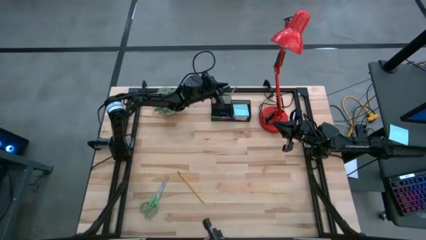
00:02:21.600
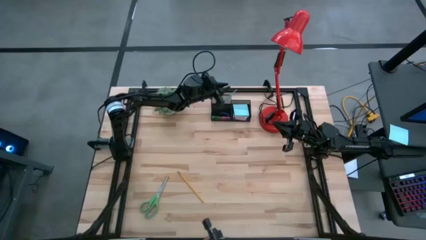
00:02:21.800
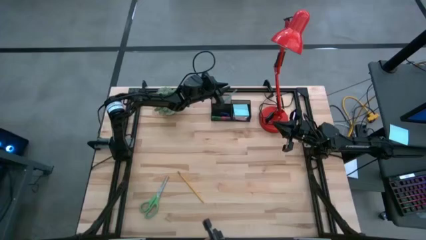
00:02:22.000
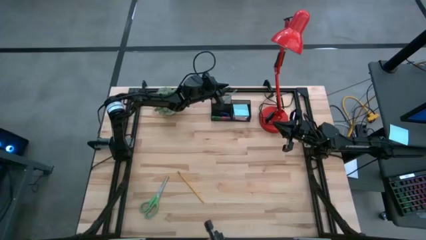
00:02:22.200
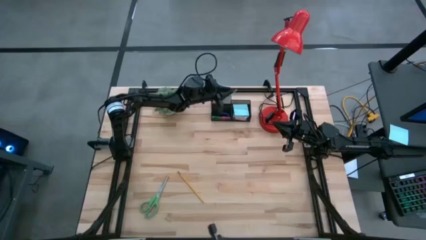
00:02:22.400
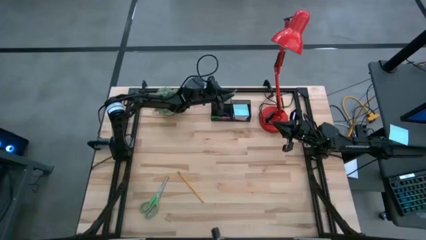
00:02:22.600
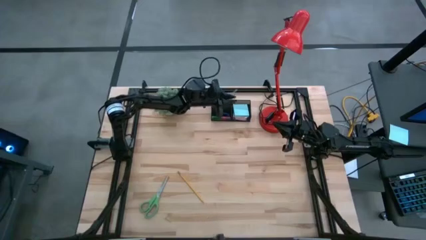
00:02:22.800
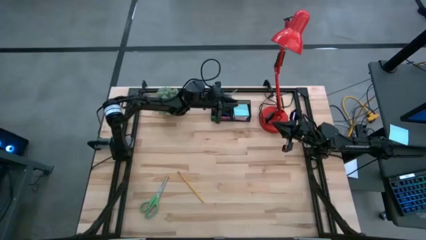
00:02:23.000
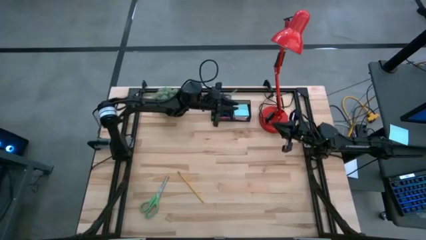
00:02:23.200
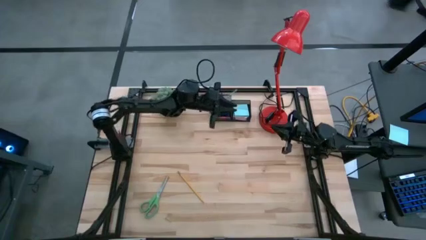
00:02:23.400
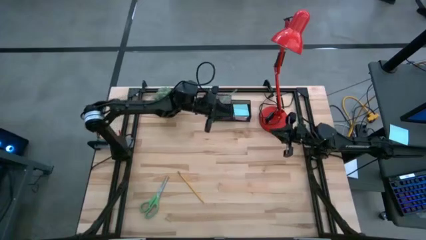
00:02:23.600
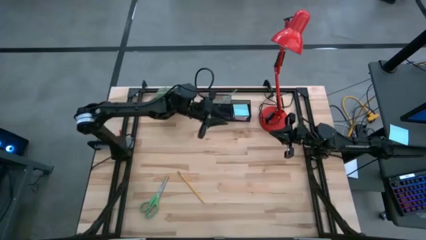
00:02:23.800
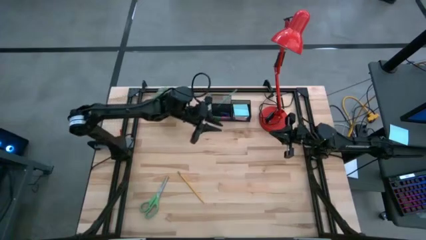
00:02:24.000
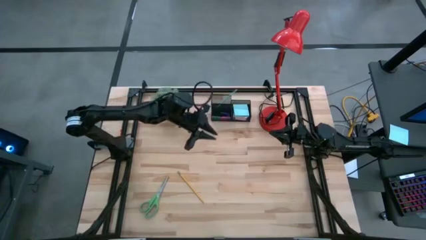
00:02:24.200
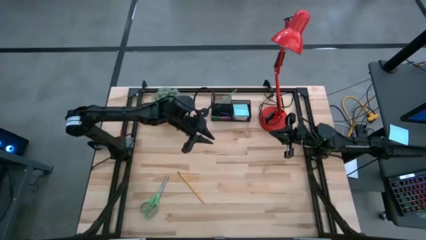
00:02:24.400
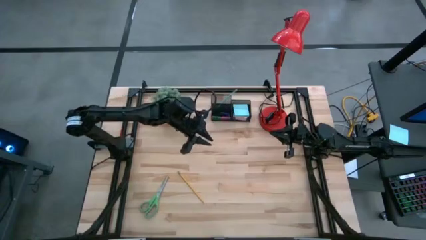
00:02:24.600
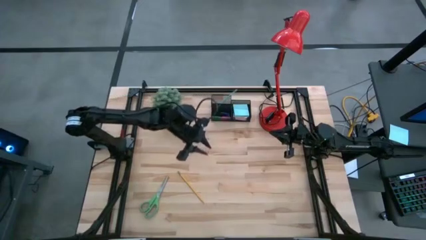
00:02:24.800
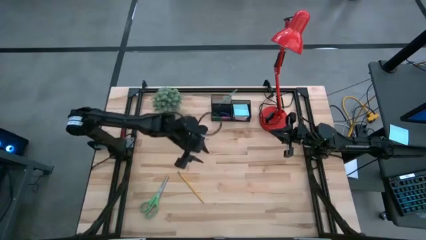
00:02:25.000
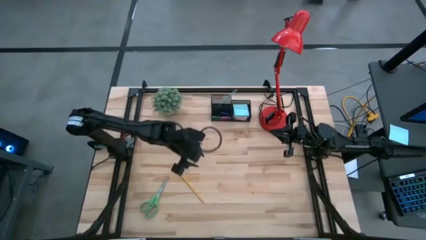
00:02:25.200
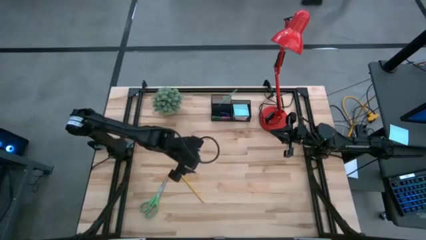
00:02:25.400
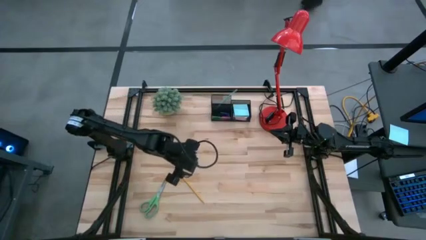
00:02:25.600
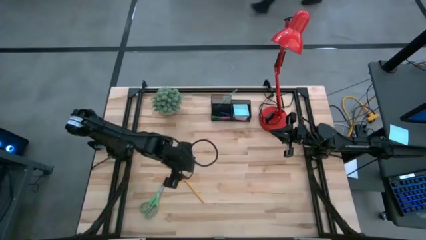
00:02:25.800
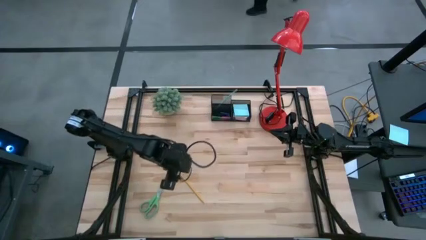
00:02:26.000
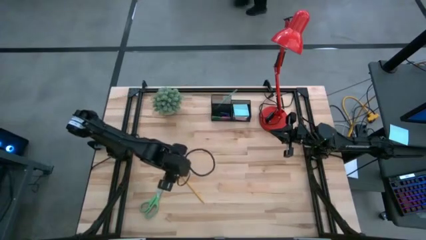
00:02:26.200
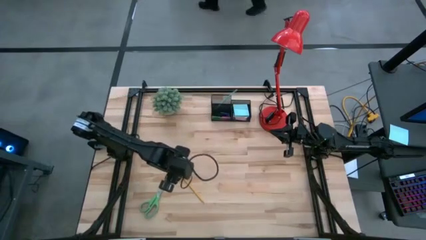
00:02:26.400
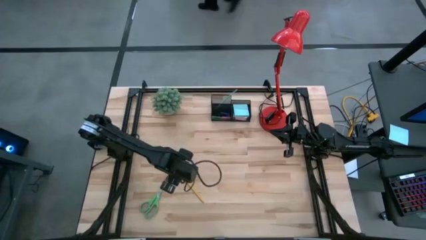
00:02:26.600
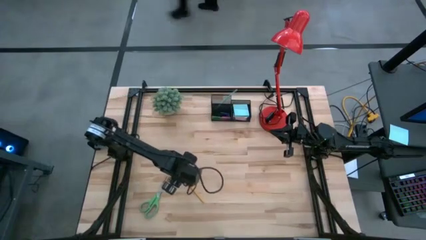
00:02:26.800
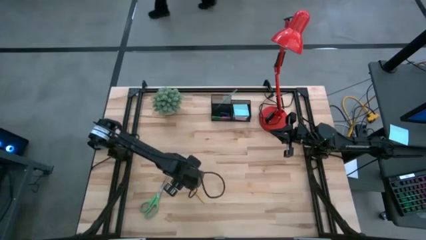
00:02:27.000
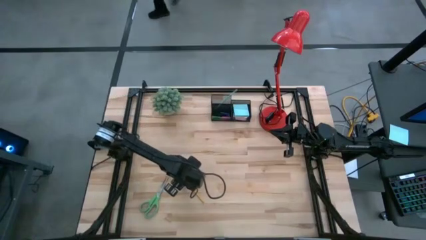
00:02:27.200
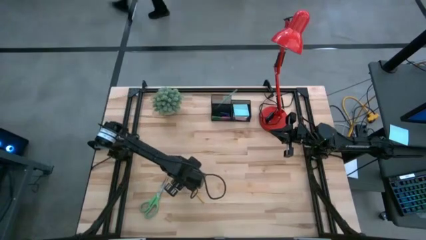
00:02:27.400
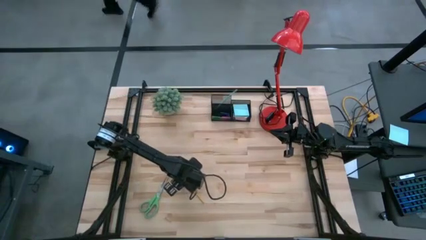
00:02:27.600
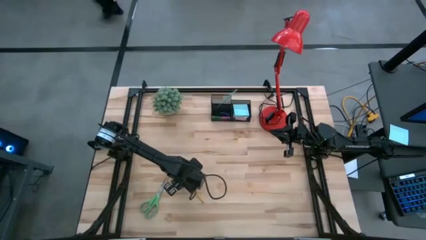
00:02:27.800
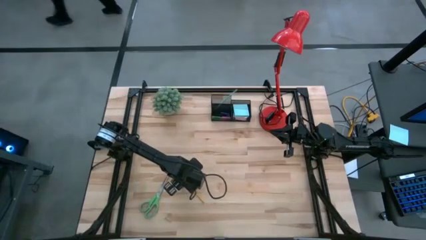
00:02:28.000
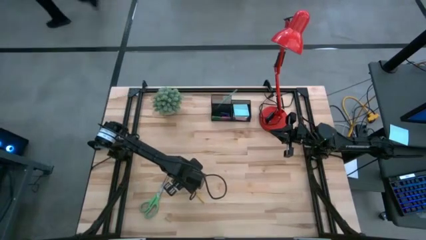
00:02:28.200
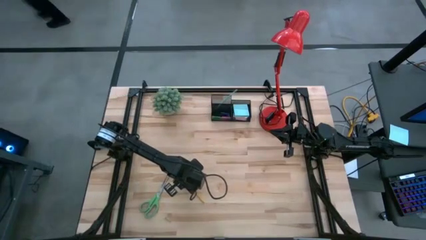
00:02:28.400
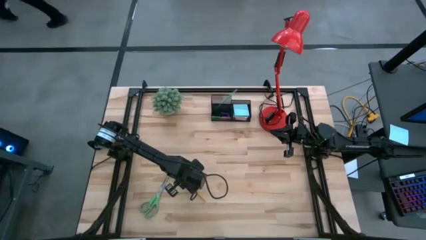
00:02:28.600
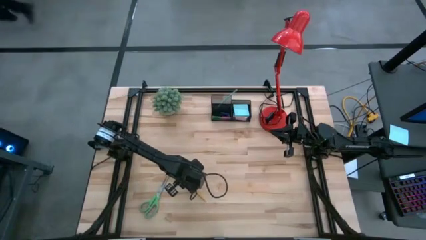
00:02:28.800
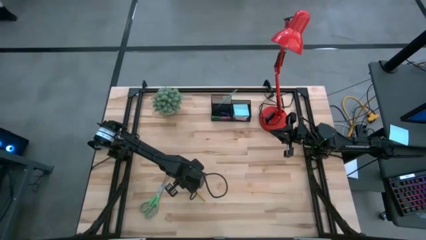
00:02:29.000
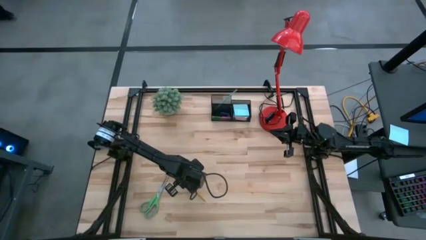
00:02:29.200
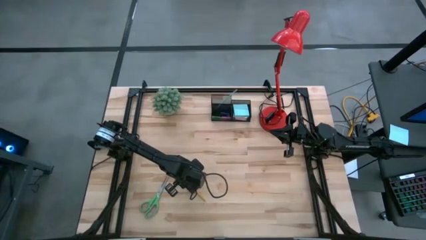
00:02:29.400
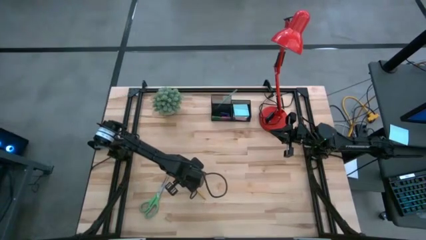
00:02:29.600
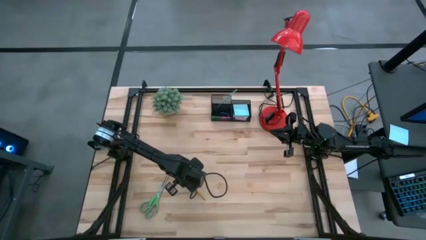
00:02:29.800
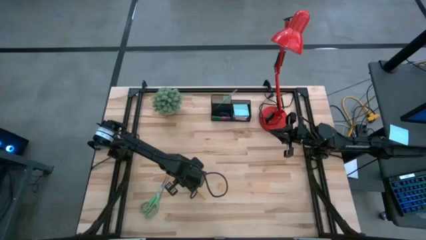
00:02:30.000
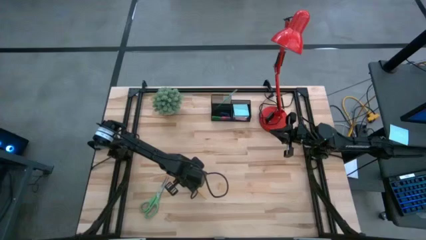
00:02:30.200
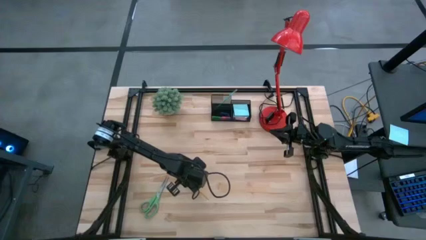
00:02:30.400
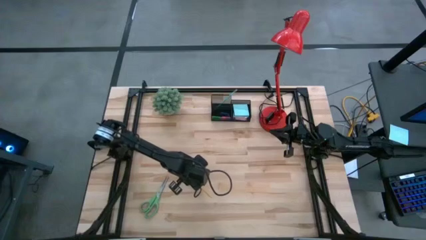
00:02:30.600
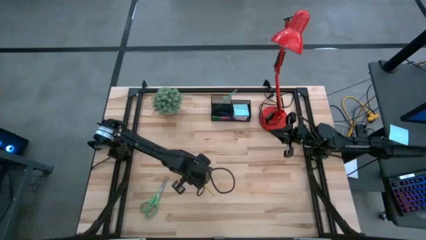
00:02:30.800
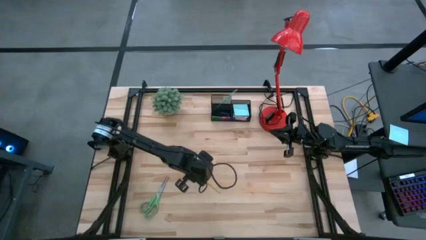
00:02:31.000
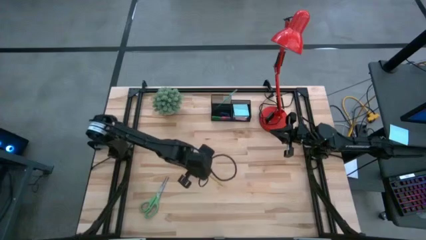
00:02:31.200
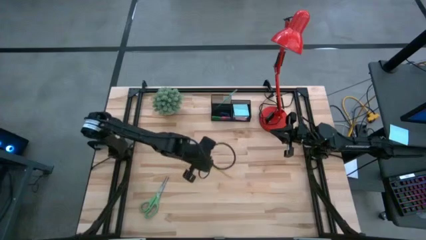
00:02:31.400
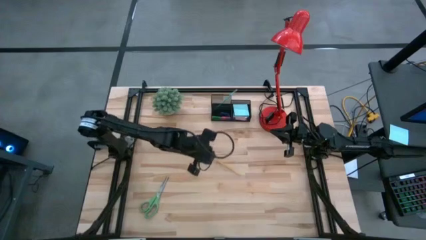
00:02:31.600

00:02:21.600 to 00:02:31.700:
Task: Pick and place office supplies into organizer
Put the yellow pencil into the desk organizer

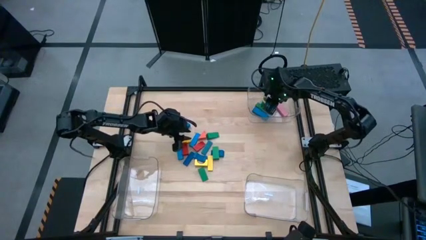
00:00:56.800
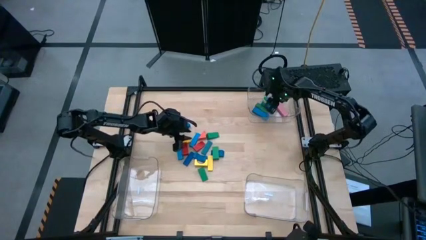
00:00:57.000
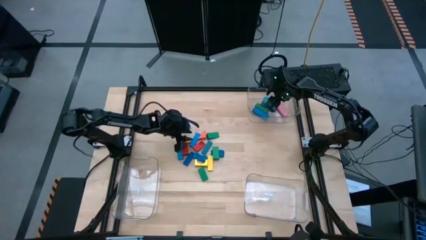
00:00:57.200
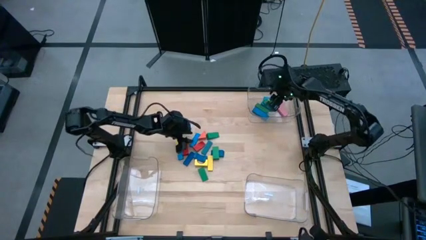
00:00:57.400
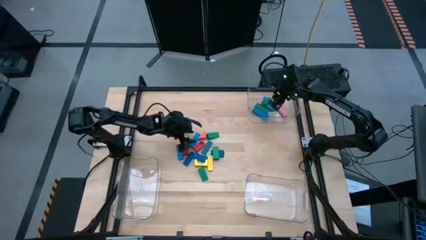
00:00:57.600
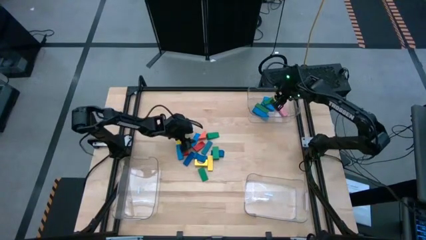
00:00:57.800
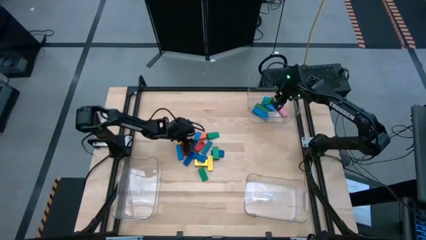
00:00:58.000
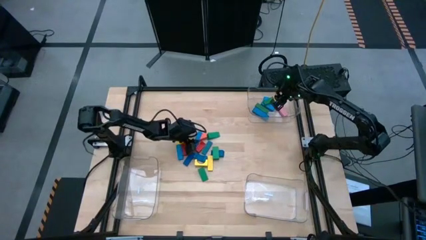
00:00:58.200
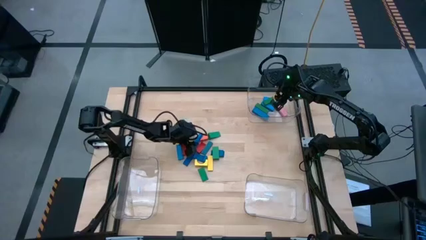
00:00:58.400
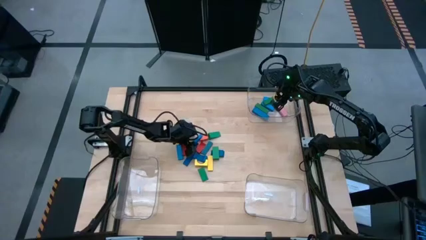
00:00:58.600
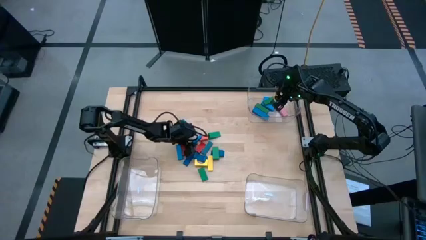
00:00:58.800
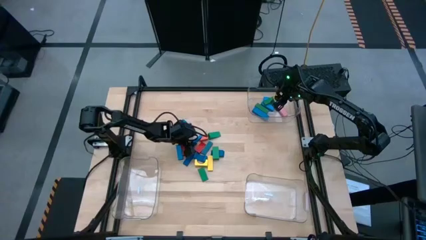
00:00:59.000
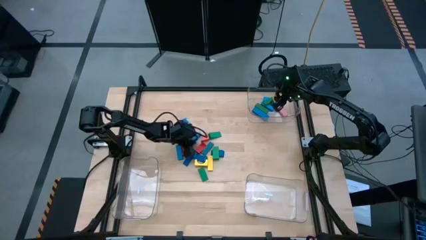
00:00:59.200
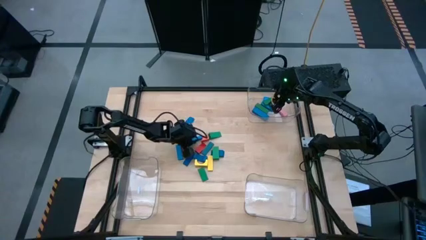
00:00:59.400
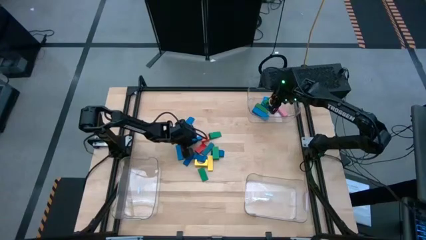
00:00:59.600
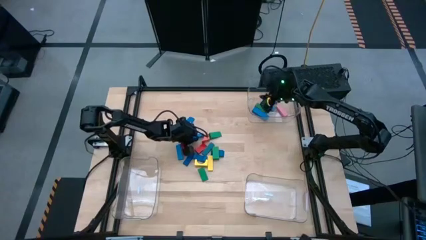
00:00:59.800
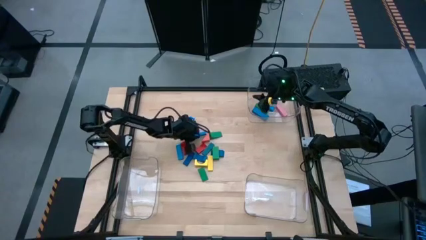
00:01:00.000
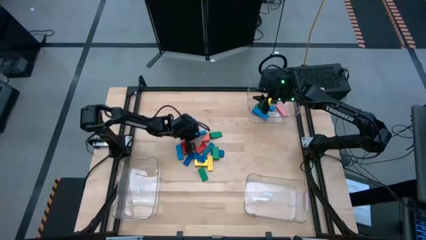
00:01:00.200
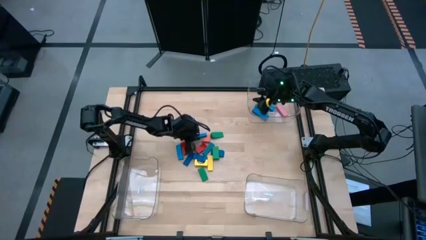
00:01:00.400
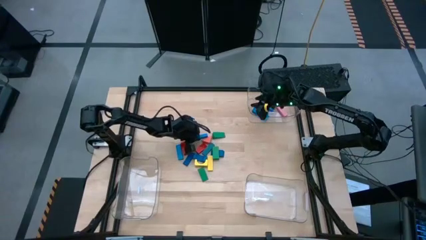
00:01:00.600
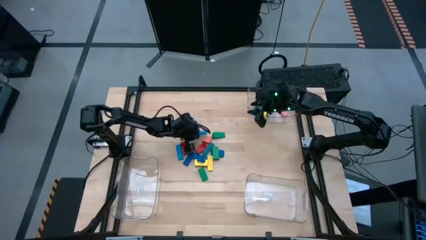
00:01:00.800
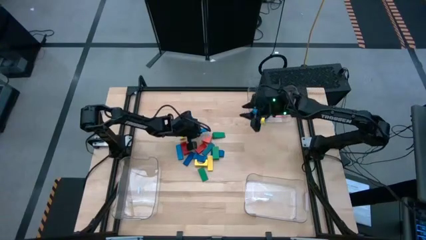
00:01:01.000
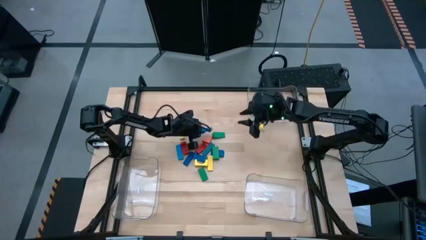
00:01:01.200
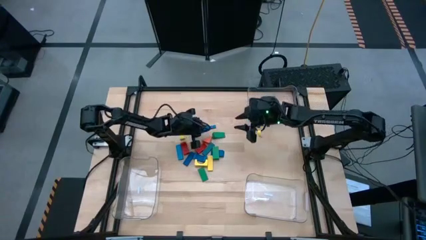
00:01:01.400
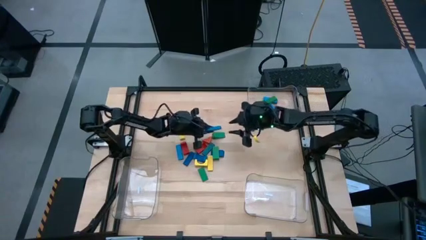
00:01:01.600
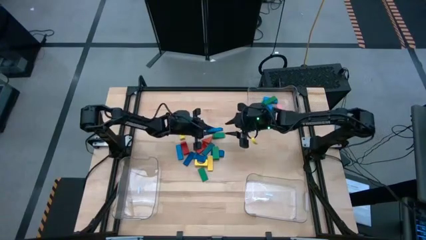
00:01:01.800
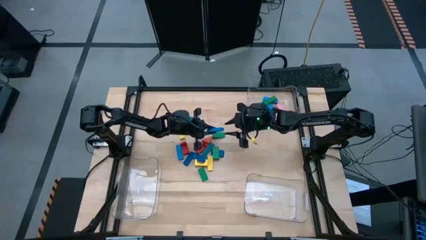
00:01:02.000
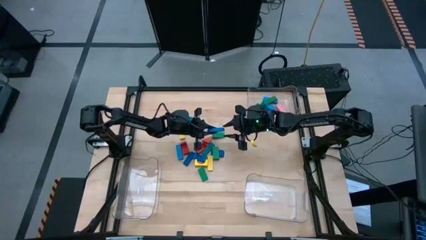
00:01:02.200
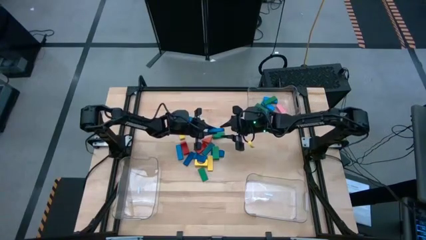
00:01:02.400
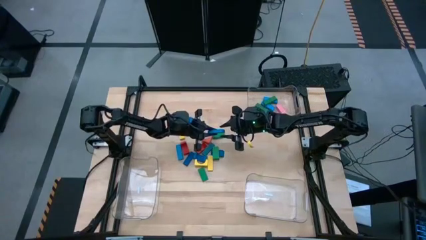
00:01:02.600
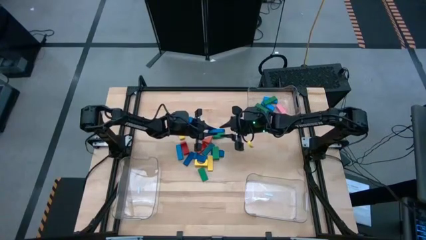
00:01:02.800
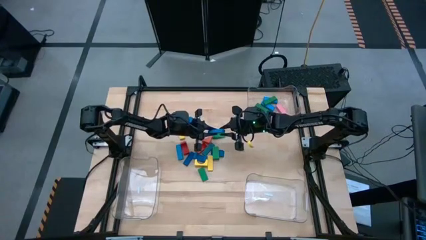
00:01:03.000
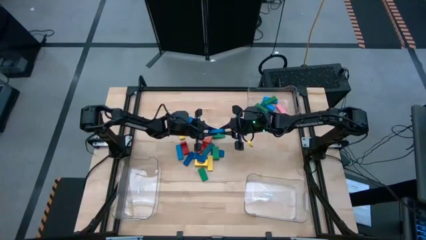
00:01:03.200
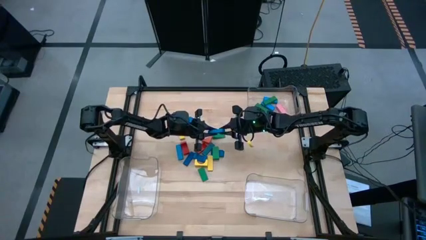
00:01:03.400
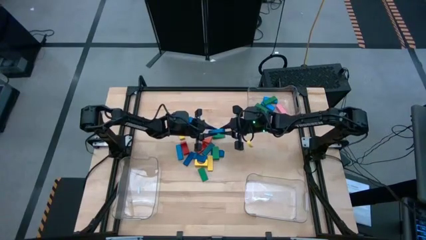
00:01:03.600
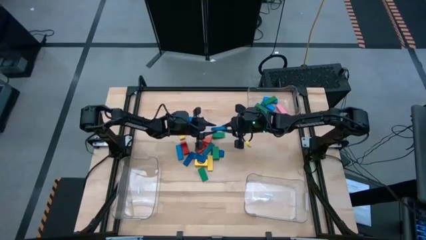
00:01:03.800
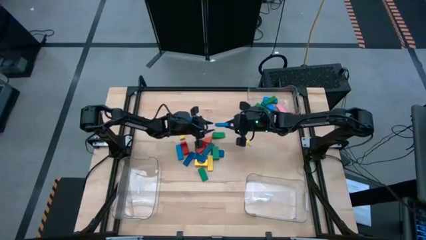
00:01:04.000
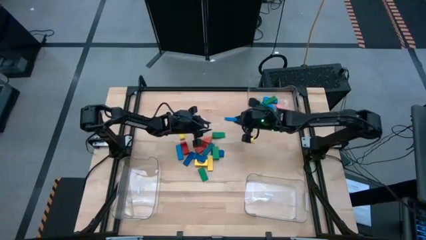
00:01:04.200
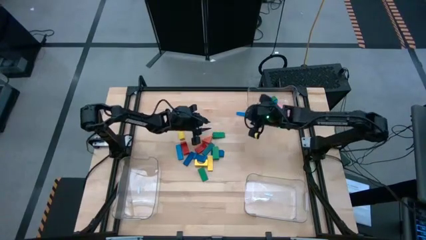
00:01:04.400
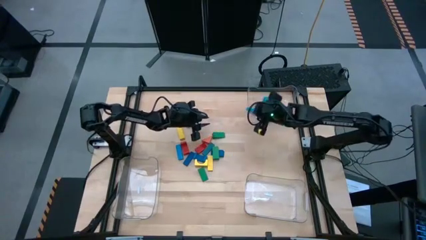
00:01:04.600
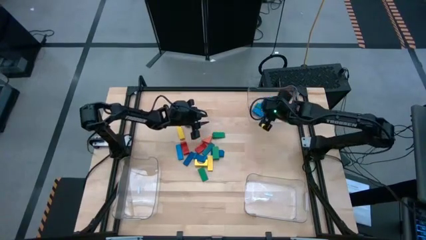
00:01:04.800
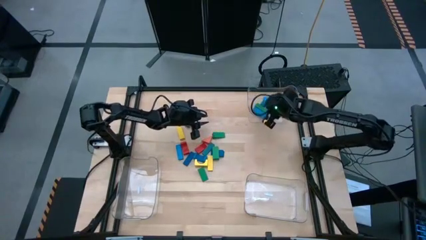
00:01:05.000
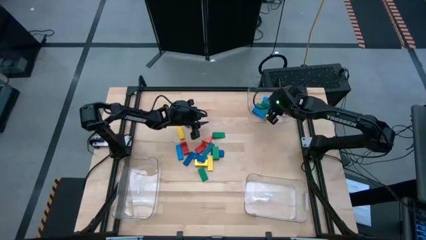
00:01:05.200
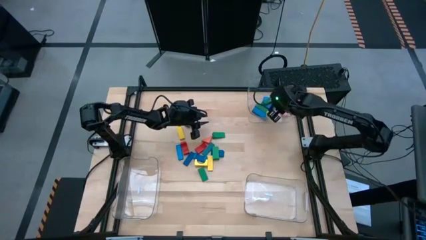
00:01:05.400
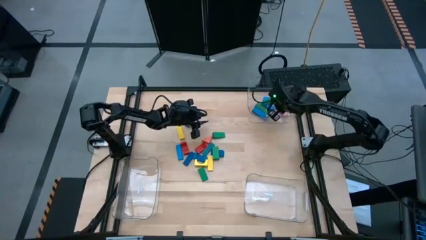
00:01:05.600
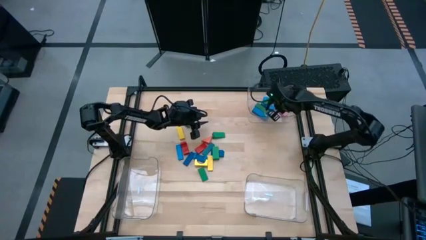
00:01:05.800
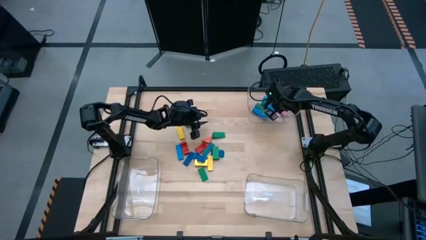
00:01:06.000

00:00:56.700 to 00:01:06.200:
Task: Sort blocks by size
Put the blue rectangle block into the top transparent bin
